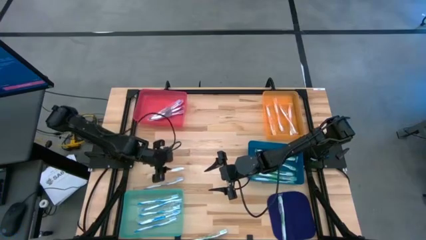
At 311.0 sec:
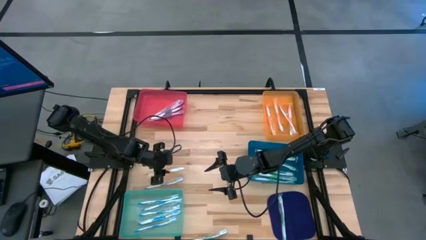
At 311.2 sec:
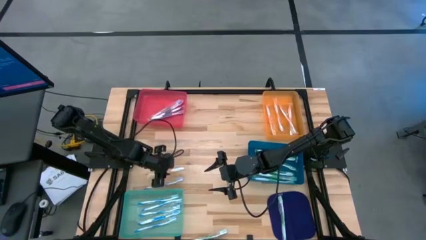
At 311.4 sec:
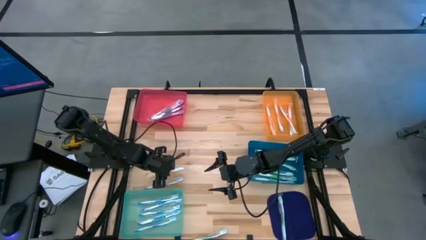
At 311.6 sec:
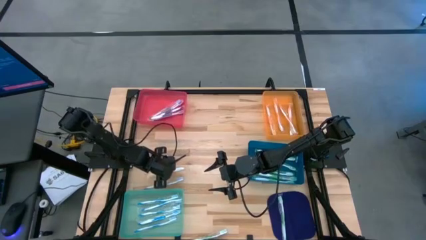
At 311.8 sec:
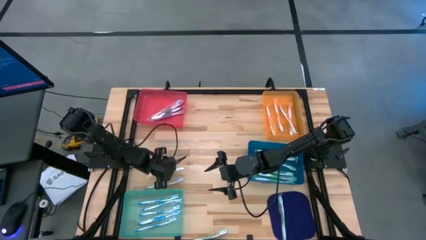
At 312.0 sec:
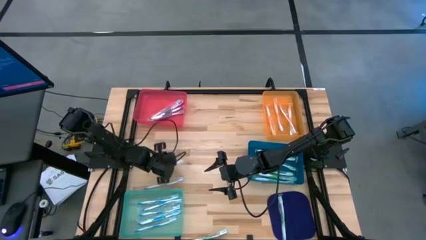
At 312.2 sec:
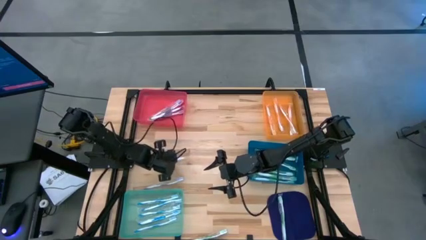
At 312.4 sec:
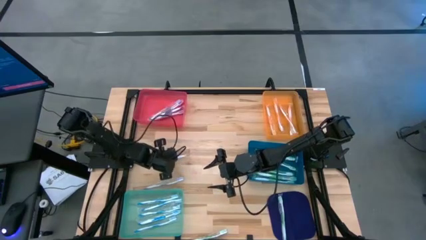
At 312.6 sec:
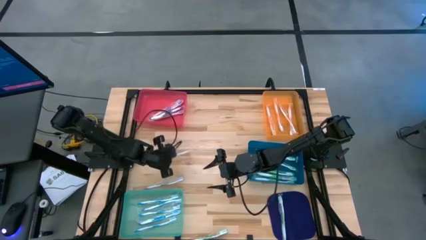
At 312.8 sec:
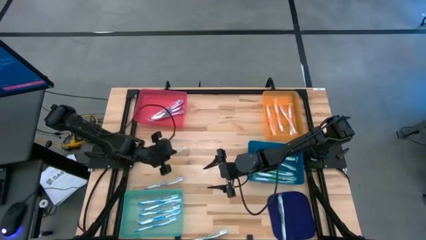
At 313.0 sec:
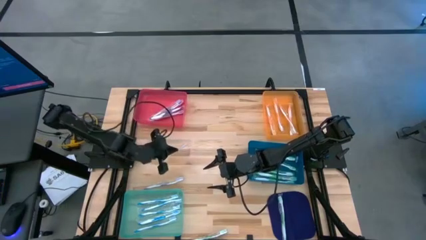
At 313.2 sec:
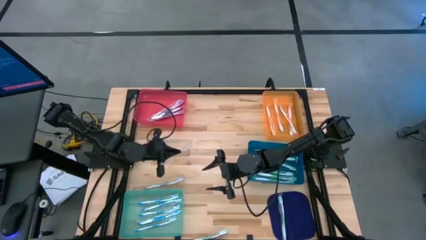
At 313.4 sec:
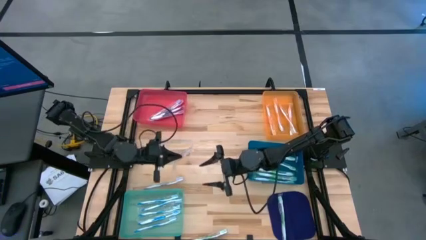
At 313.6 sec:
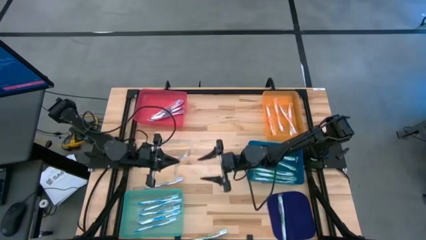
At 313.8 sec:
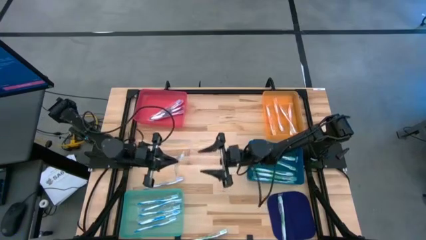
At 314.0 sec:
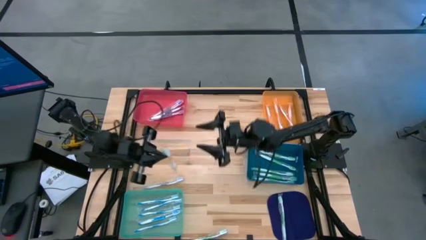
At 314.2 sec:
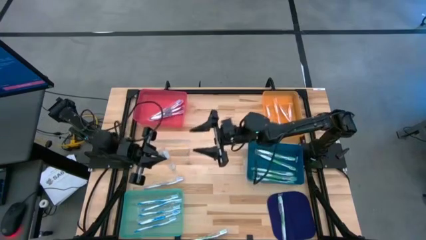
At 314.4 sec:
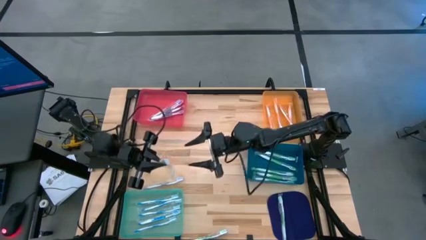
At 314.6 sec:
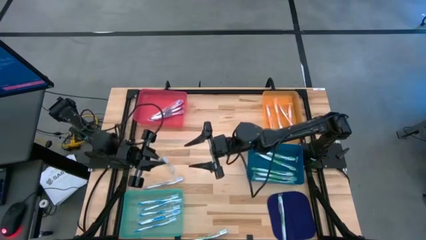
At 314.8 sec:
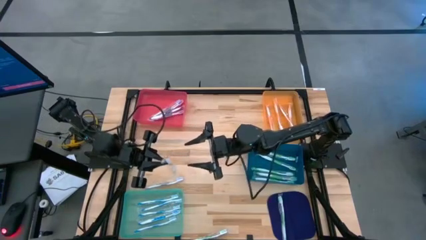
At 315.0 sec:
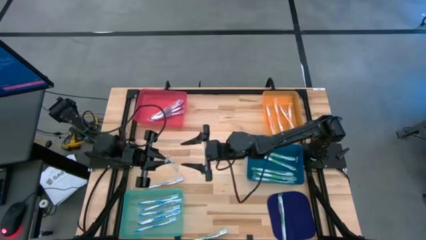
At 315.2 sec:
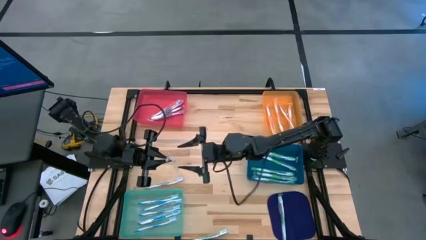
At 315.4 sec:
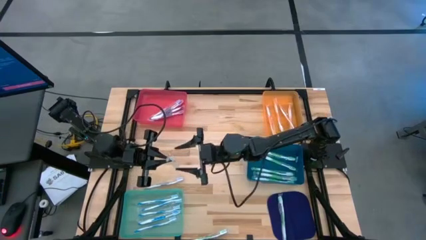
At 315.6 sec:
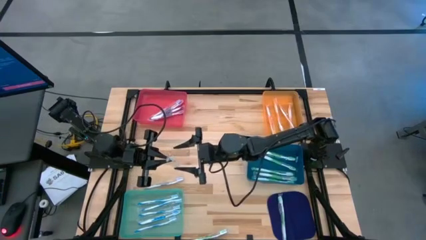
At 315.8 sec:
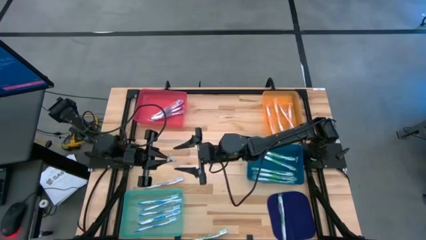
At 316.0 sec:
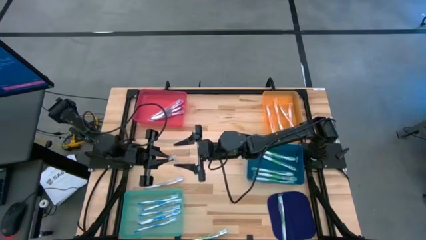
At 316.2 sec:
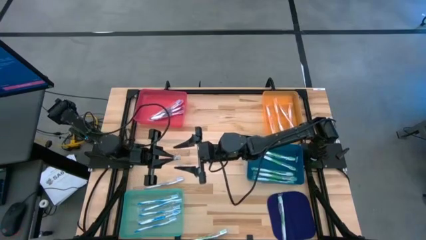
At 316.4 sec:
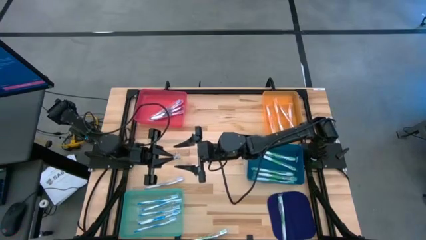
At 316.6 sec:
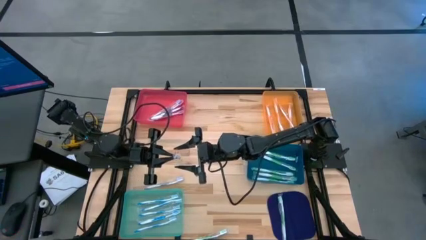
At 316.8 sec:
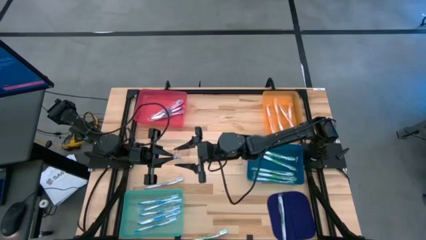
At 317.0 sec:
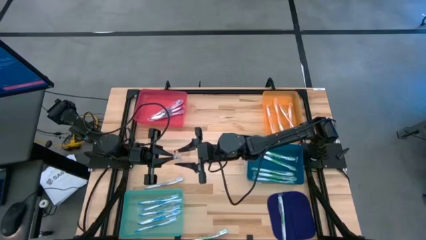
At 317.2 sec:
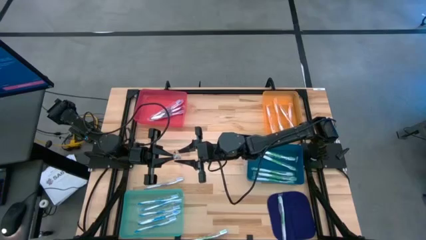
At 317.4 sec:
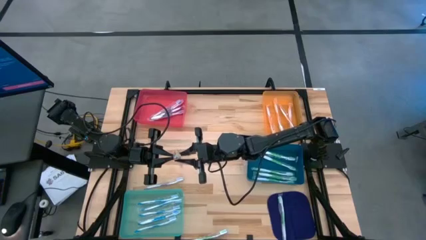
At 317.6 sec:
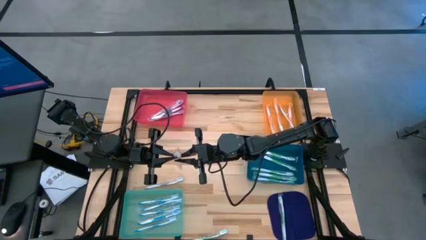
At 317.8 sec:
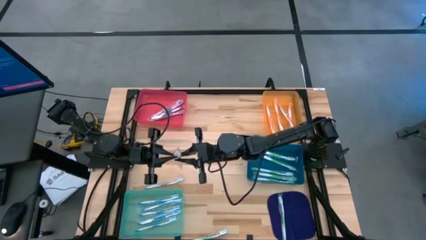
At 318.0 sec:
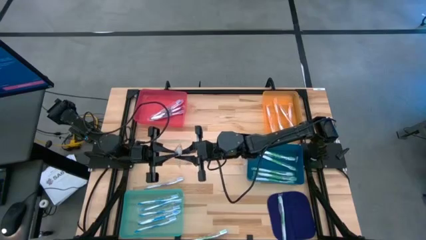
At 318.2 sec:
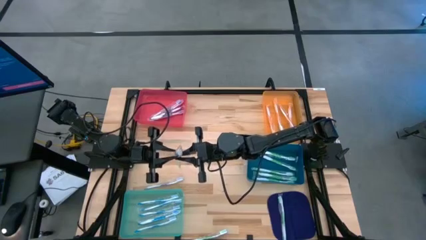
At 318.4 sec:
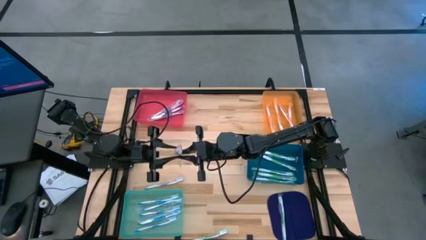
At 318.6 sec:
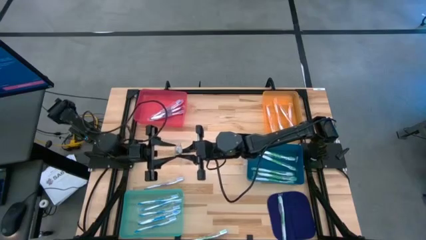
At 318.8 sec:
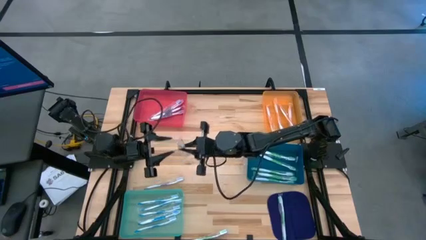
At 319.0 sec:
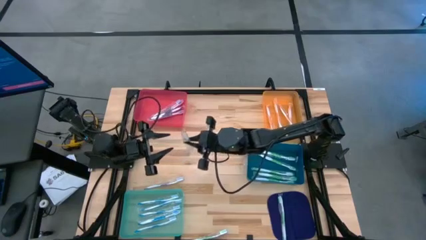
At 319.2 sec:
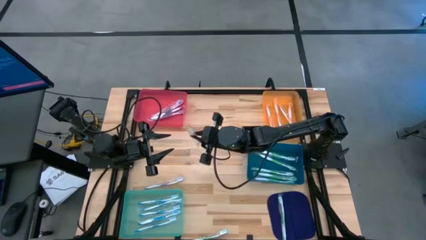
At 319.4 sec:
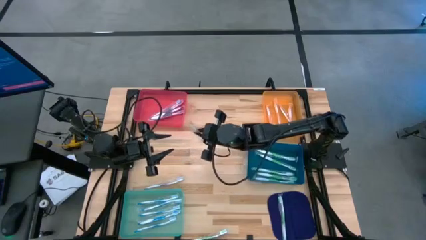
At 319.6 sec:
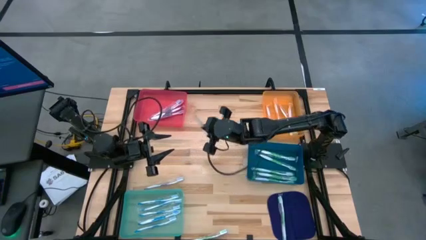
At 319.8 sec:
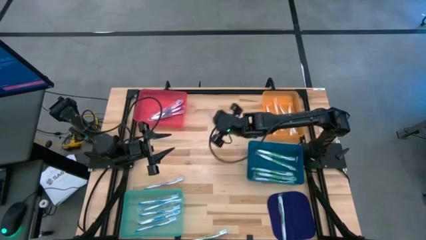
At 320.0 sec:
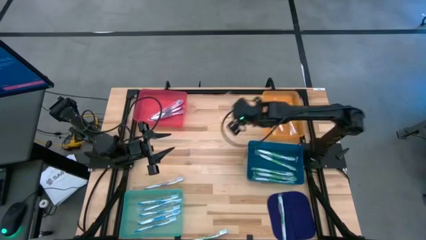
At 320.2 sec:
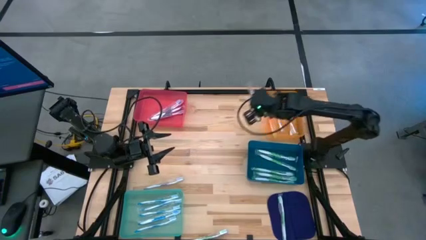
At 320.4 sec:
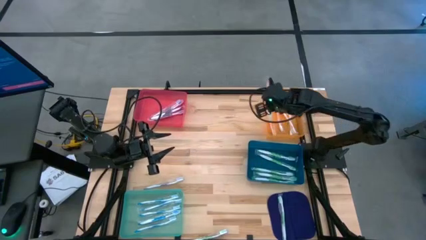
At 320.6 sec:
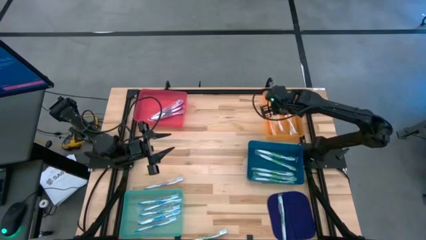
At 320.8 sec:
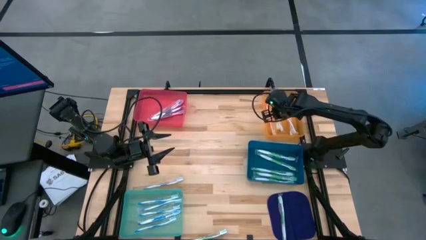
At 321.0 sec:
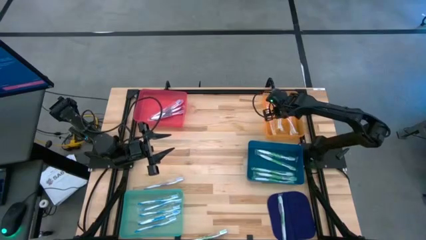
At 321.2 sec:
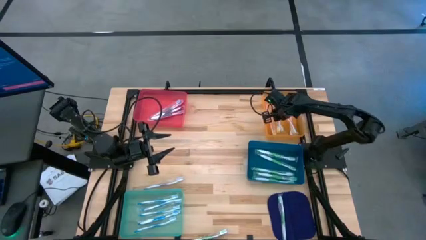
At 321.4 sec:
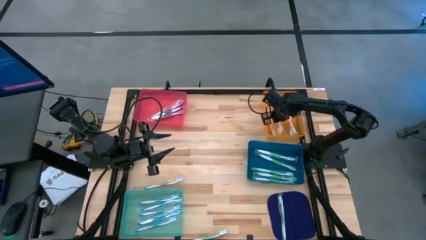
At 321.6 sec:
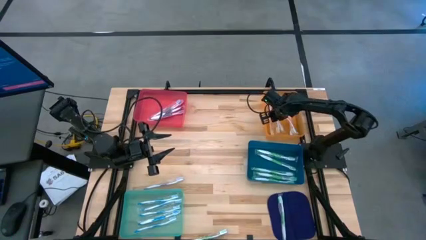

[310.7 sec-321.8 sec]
Task: Pick & Place Toothbrushes
Put the orange toothbrush into the orange bin
